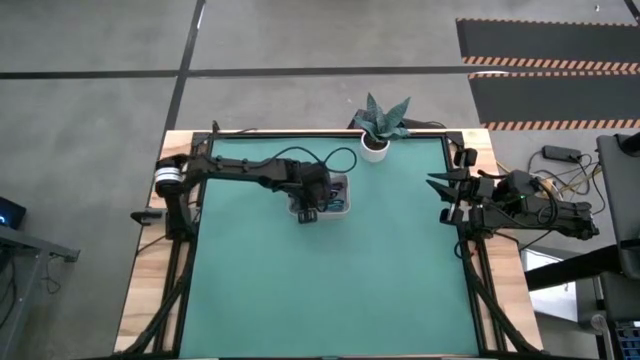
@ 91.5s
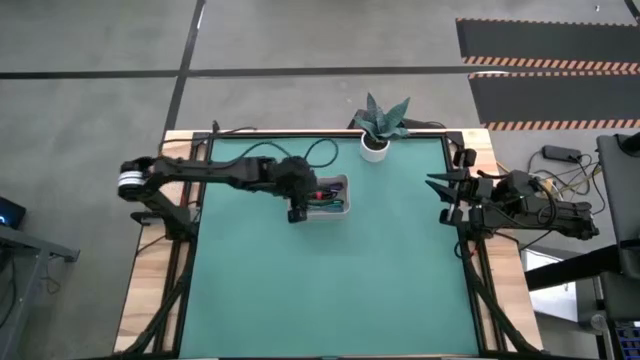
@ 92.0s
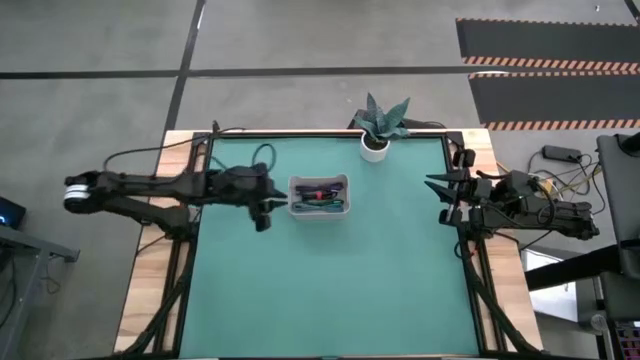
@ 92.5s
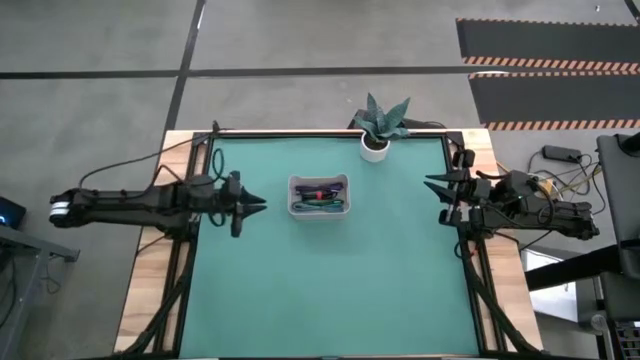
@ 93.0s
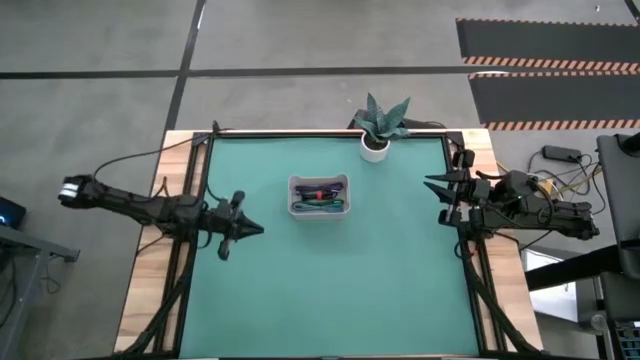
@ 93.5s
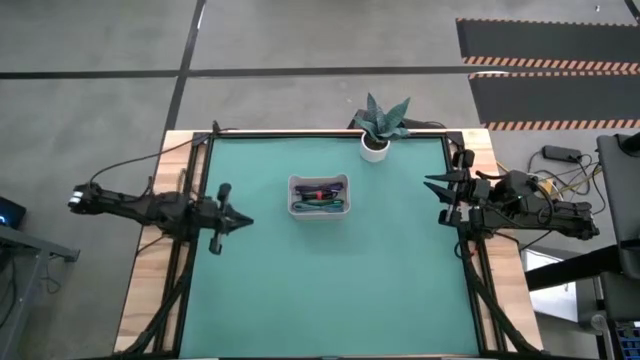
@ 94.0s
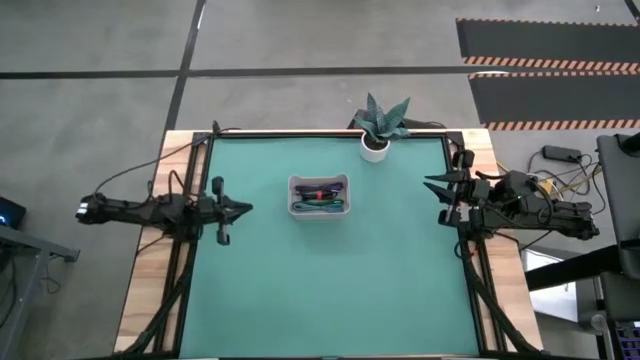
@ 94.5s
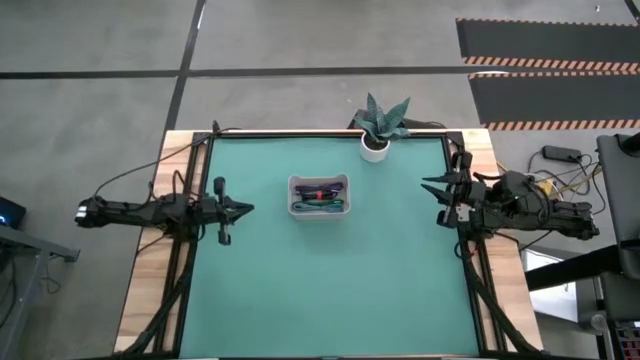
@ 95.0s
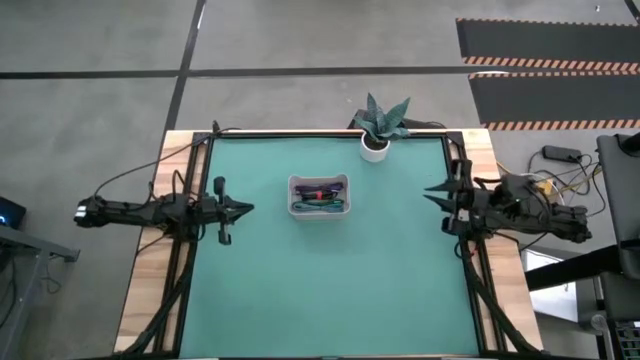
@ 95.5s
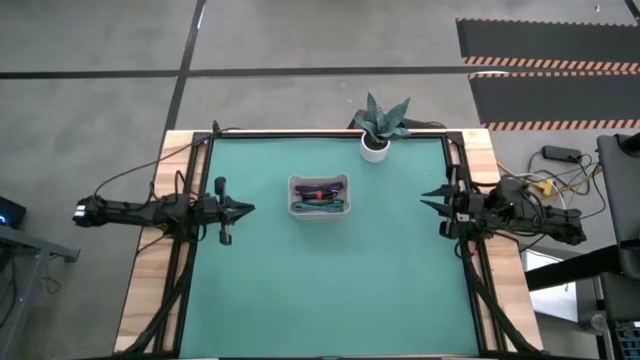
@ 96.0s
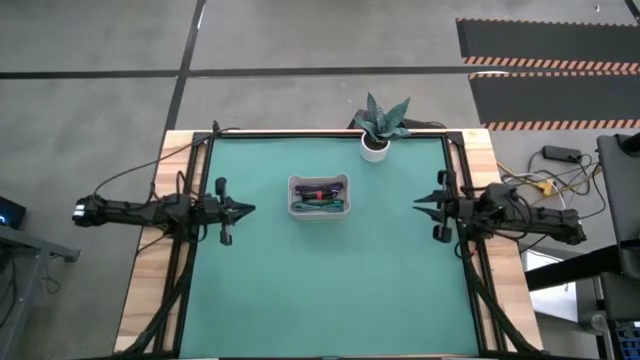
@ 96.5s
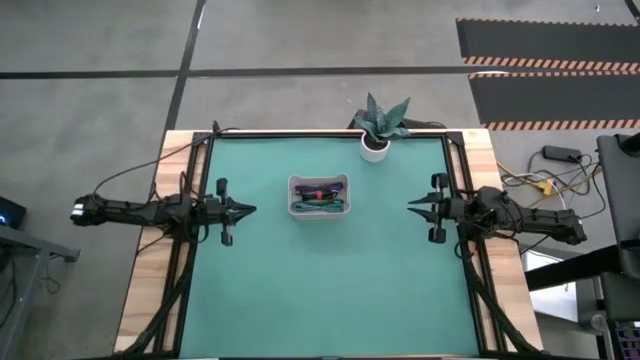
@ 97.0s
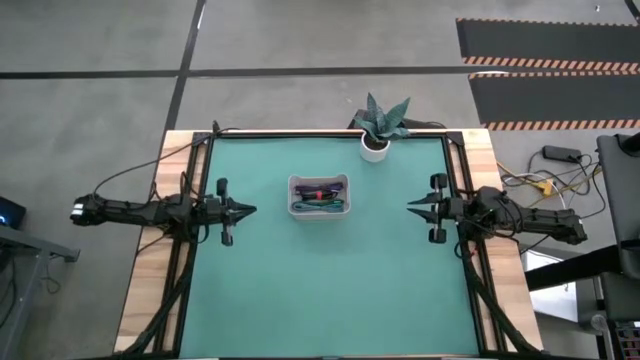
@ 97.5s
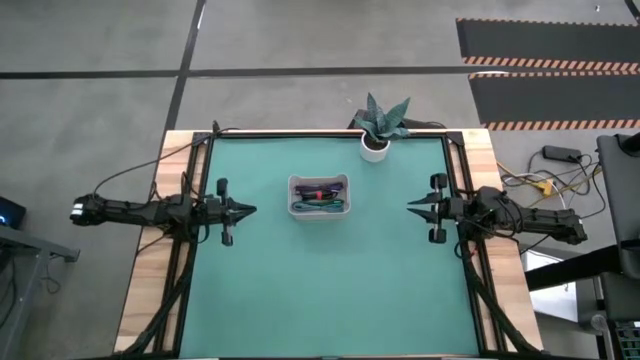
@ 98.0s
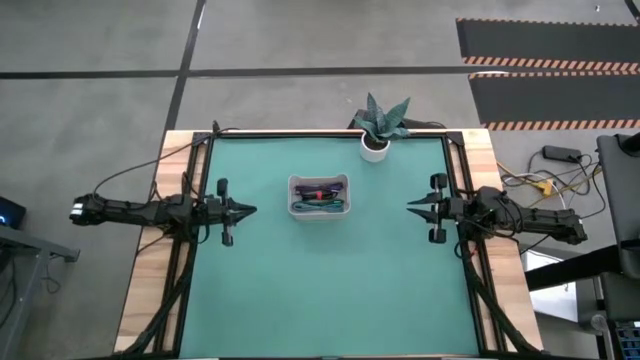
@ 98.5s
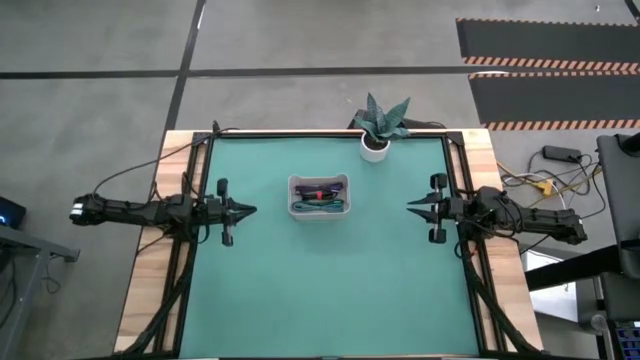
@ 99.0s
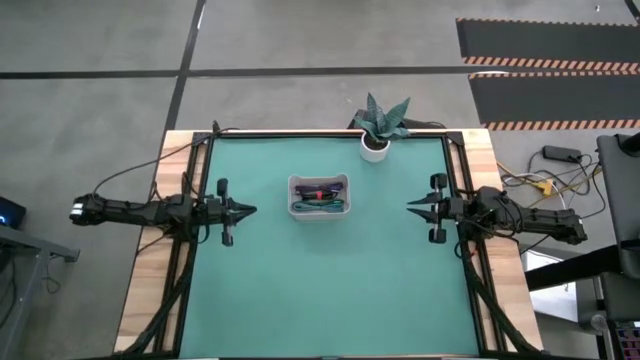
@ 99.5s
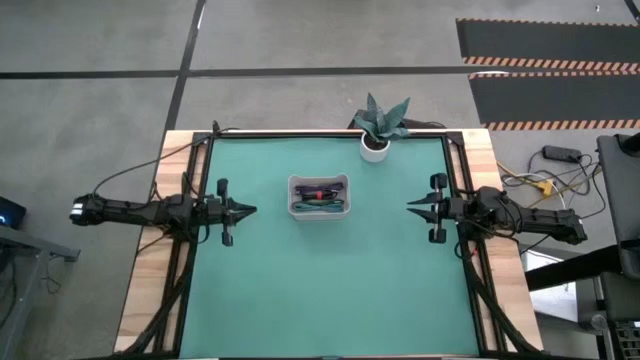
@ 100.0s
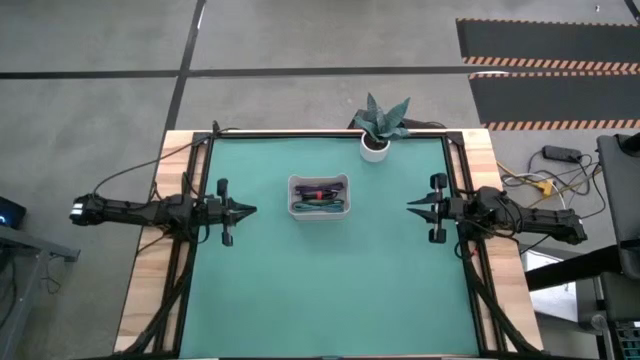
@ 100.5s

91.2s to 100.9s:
Task: Pick and place USB-C Cables
Return to Home Position

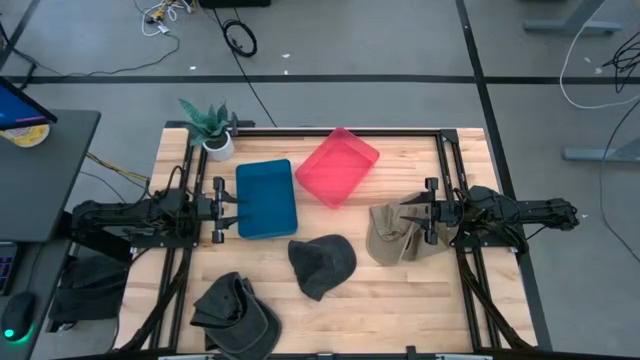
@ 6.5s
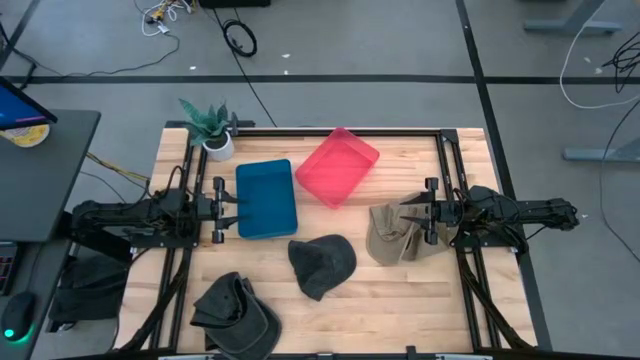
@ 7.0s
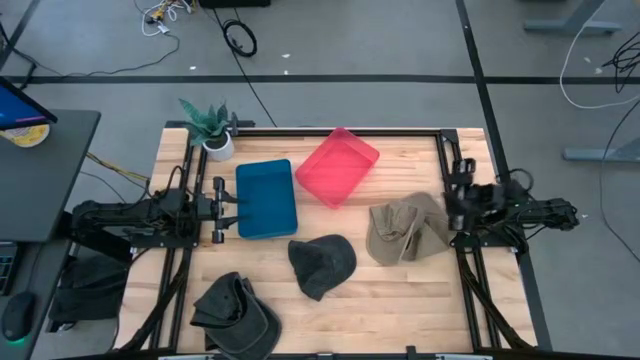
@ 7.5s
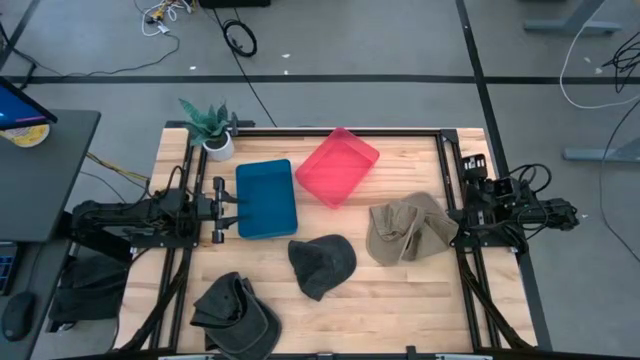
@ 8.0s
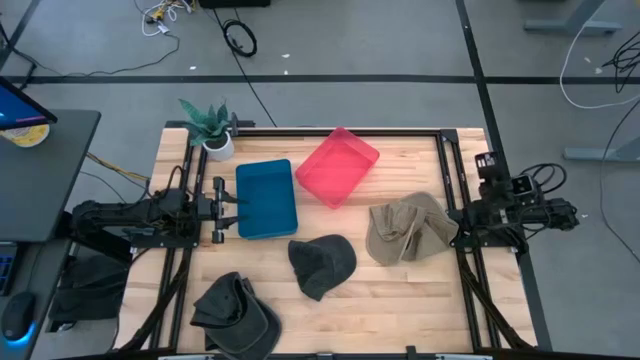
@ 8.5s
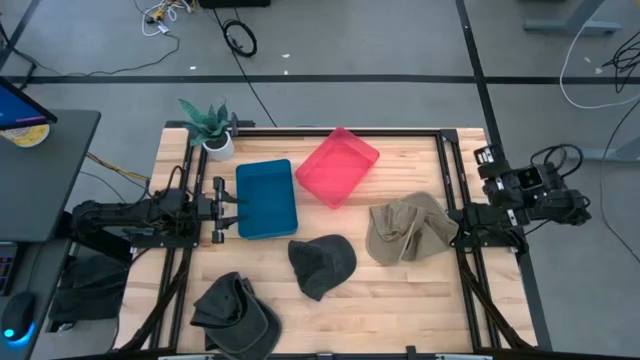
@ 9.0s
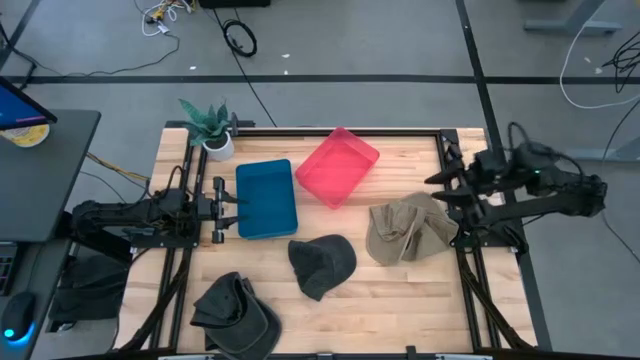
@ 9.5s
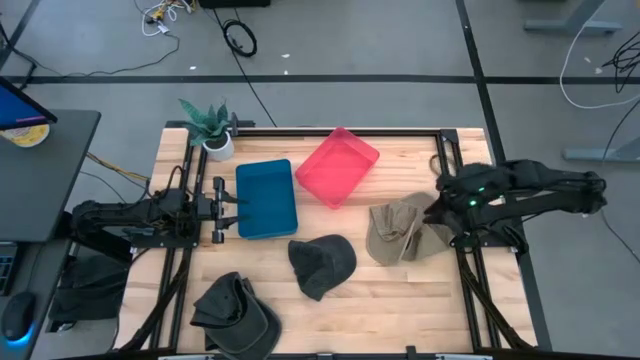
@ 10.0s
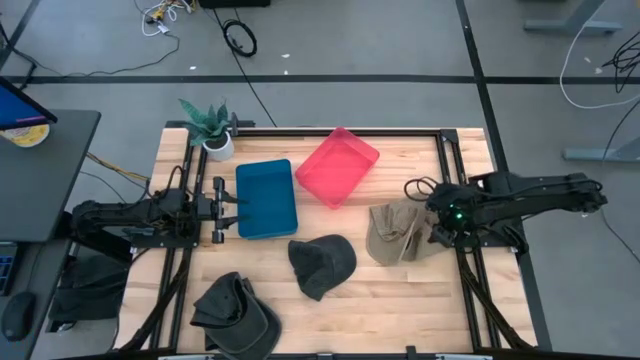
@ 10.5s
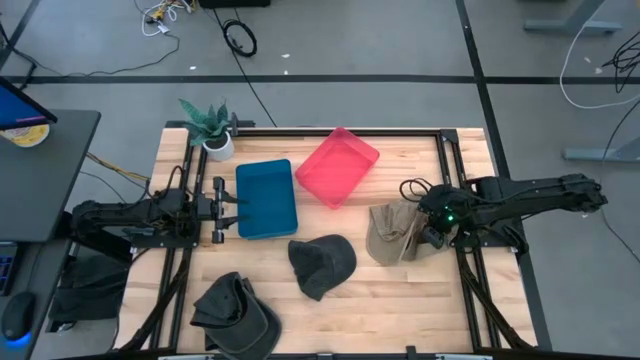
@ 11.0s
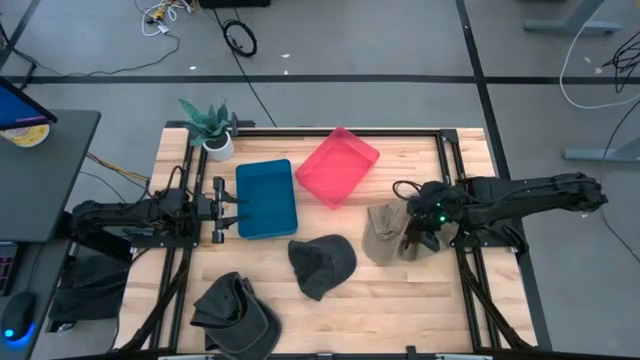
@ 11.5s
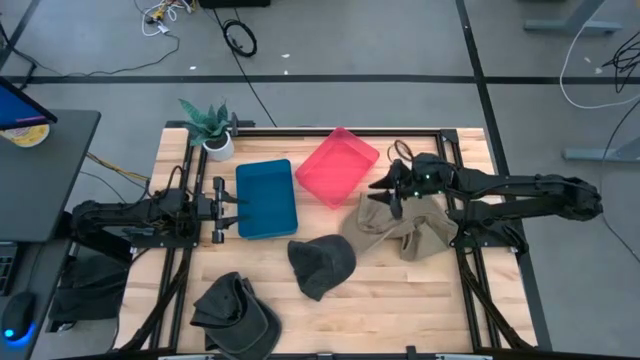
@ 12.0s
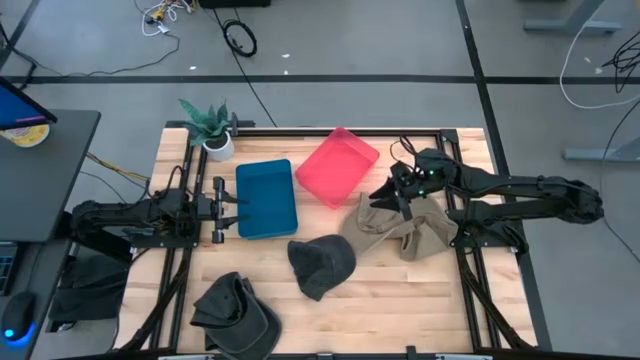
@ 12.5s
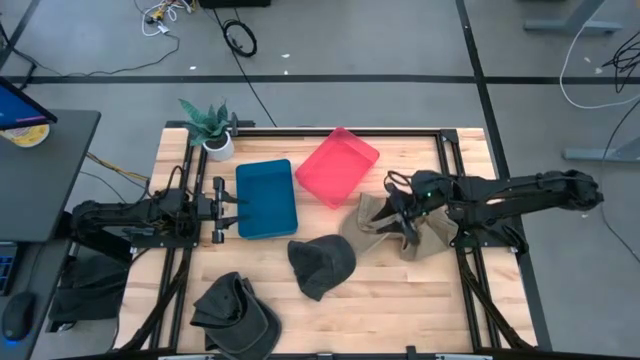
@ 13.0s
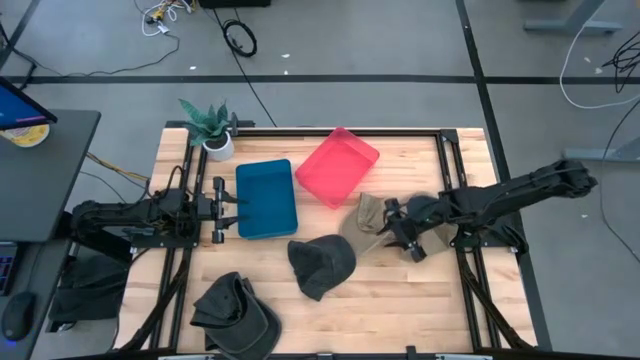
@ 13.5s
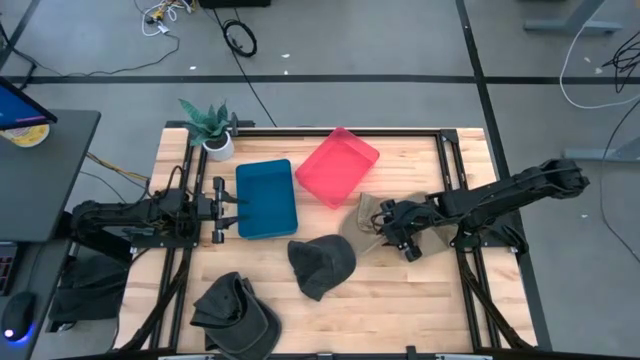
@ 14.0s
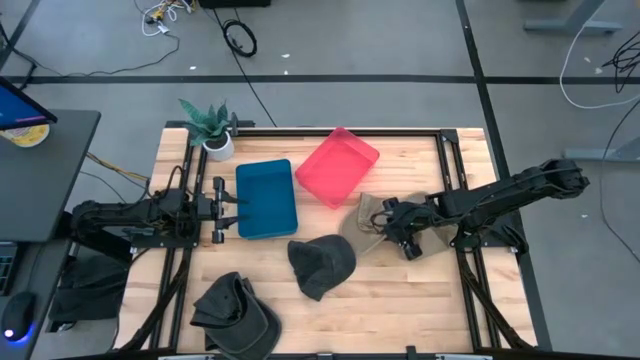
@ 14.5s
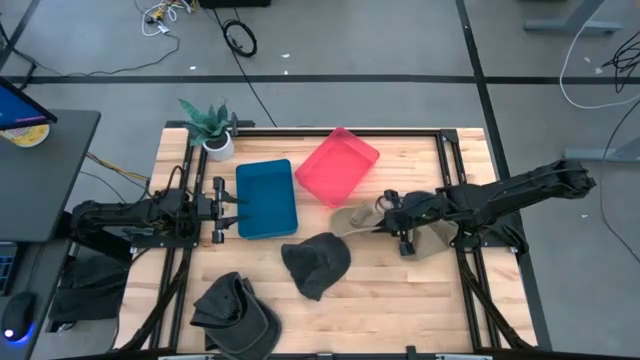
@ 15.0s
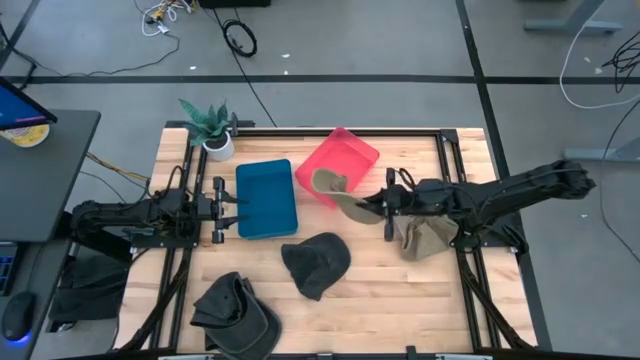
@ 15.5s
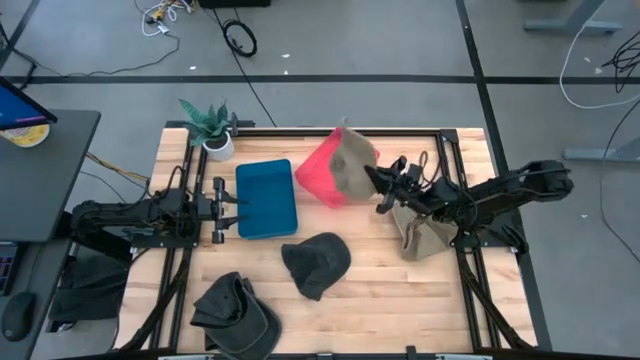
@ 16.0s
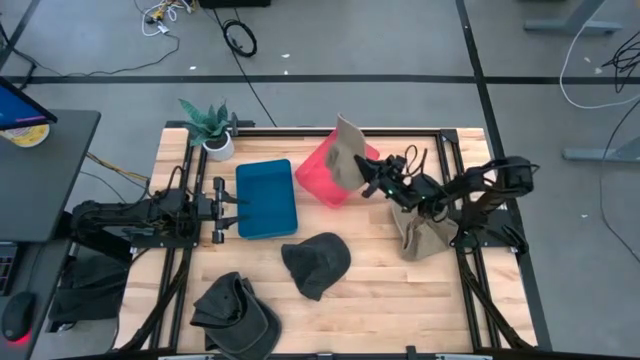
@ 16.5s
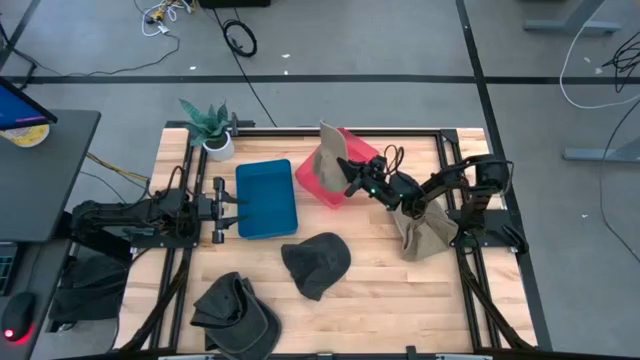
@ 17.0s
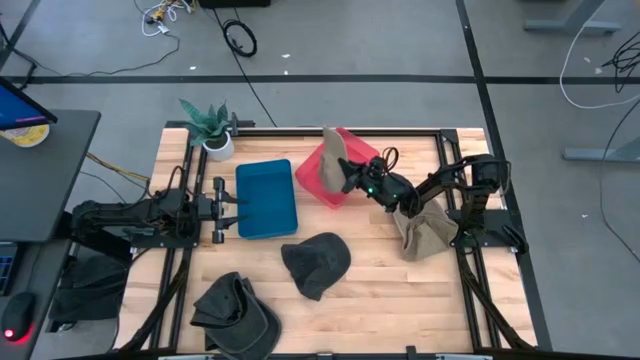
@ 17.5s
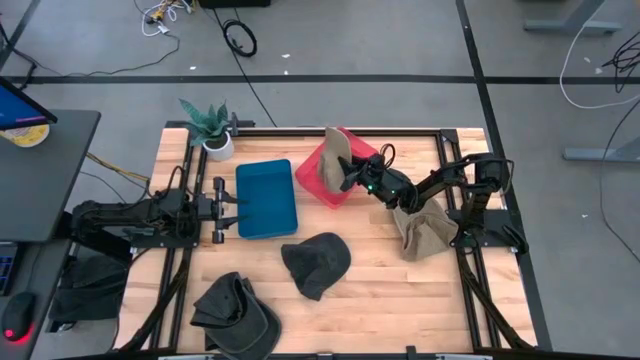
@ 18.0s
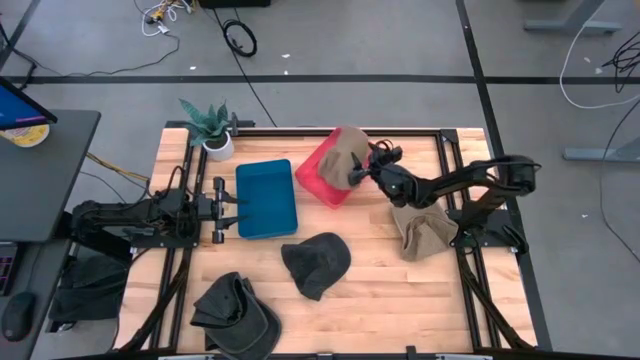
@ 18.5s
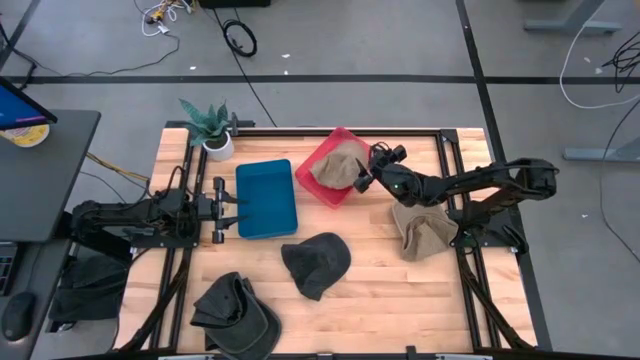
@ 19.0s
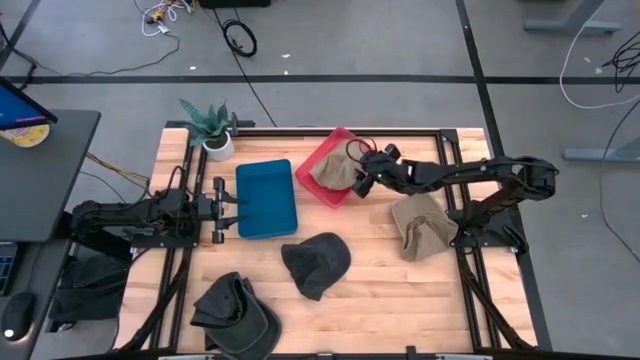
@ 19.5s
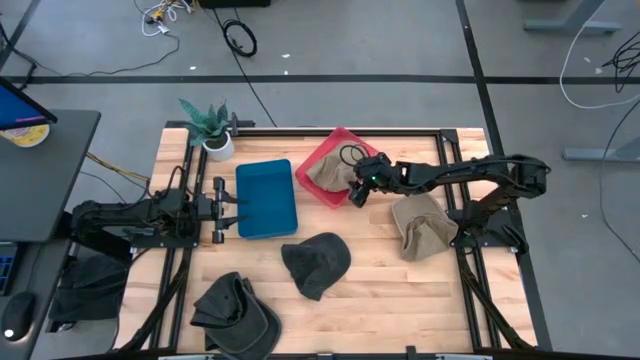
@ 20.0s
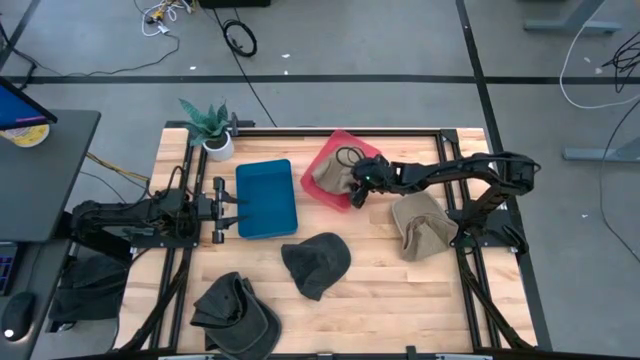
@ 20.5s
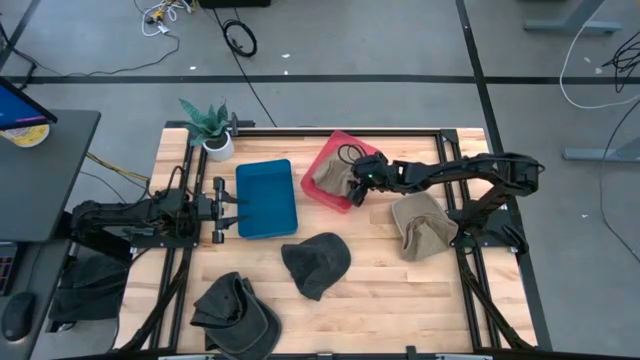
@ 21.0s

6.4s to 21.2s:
Task: Pick & Place hat
Put the left brown cap into the pink bin
